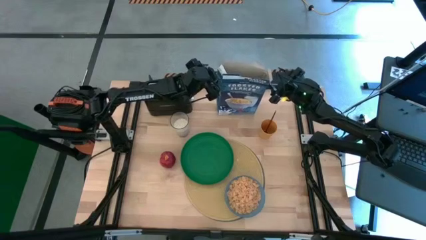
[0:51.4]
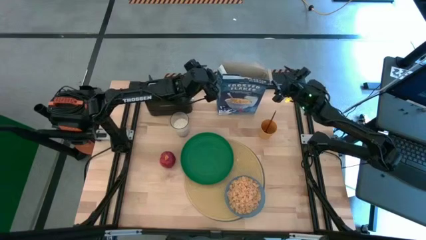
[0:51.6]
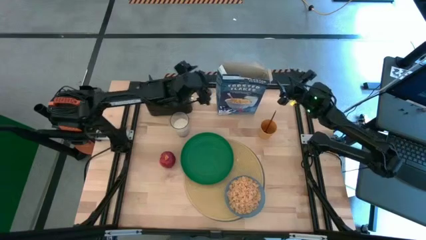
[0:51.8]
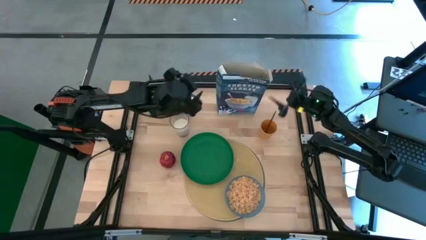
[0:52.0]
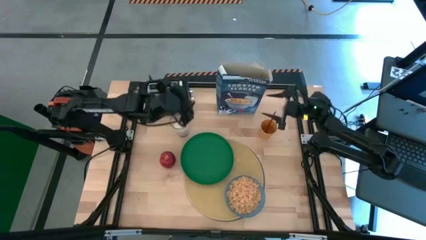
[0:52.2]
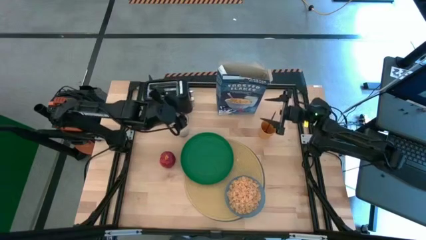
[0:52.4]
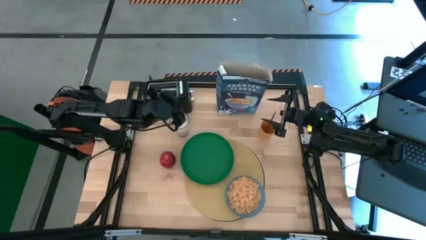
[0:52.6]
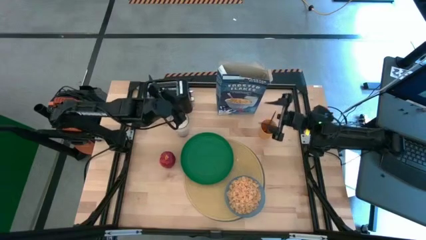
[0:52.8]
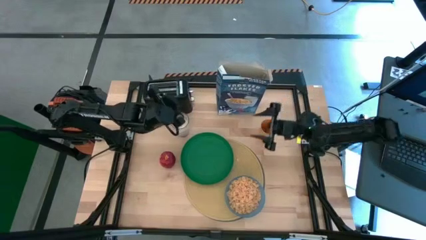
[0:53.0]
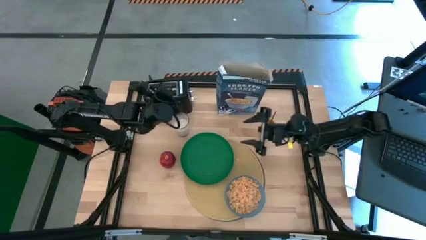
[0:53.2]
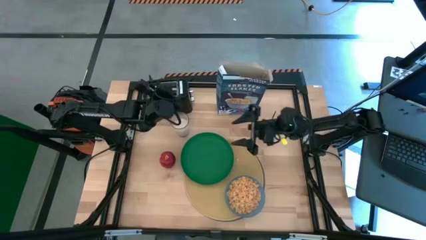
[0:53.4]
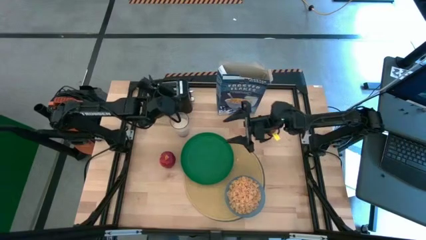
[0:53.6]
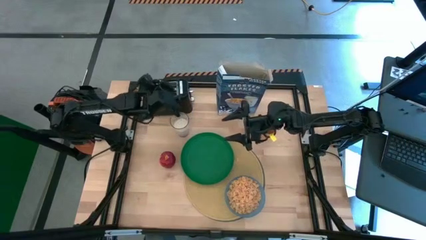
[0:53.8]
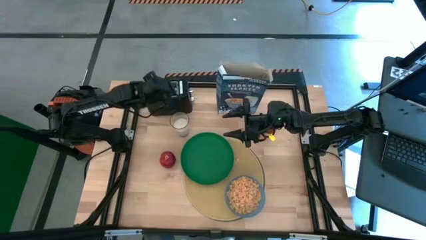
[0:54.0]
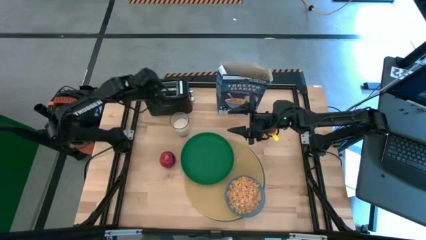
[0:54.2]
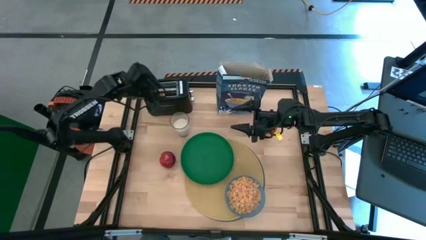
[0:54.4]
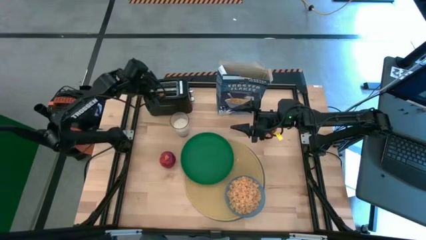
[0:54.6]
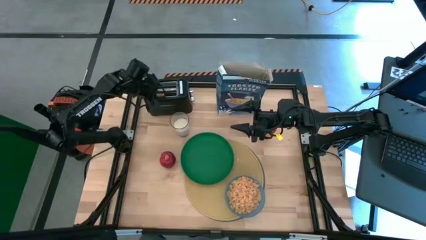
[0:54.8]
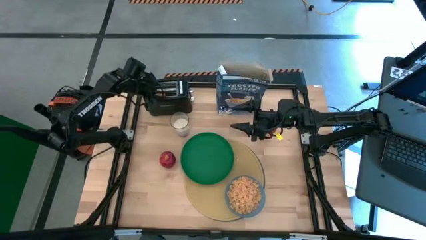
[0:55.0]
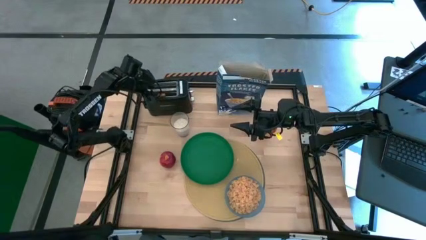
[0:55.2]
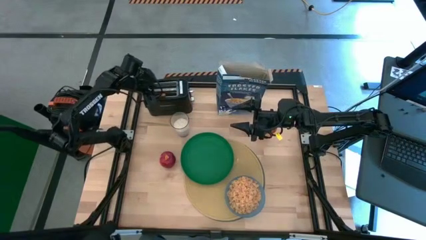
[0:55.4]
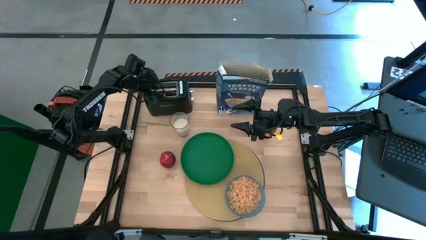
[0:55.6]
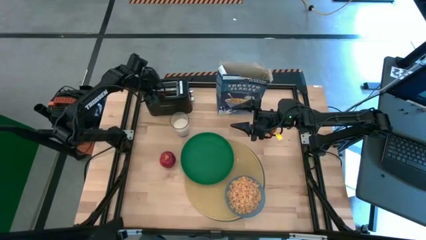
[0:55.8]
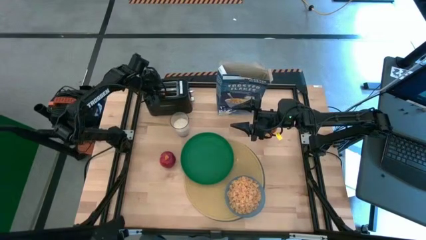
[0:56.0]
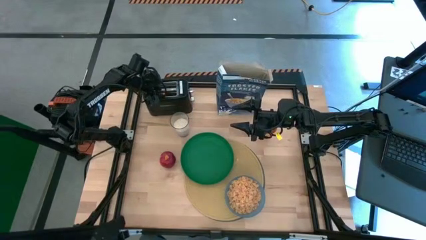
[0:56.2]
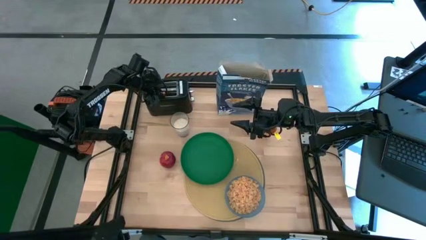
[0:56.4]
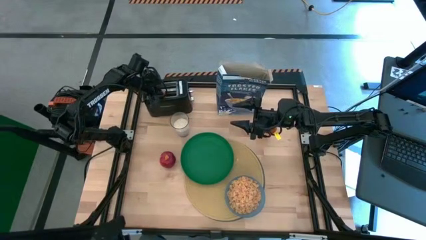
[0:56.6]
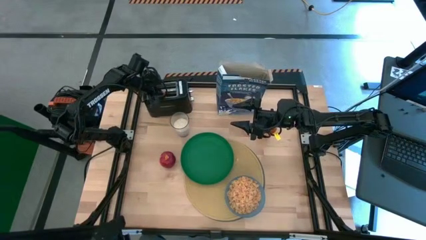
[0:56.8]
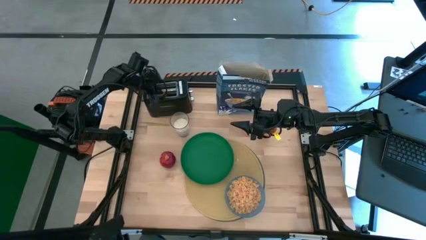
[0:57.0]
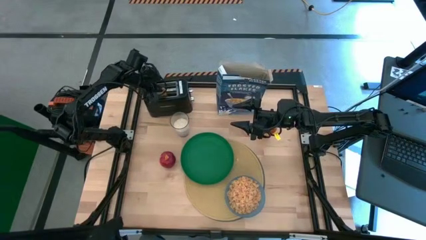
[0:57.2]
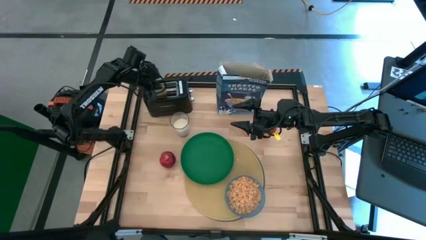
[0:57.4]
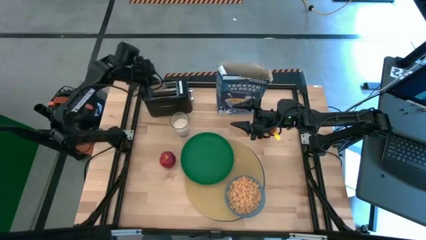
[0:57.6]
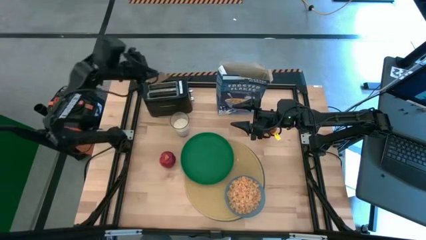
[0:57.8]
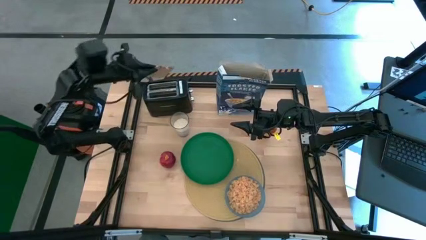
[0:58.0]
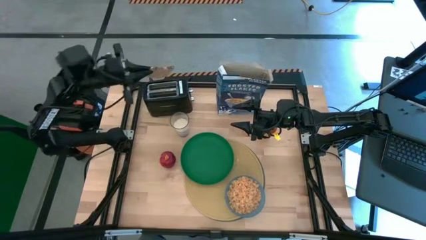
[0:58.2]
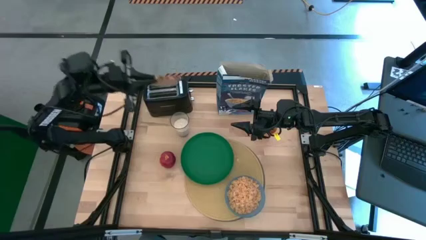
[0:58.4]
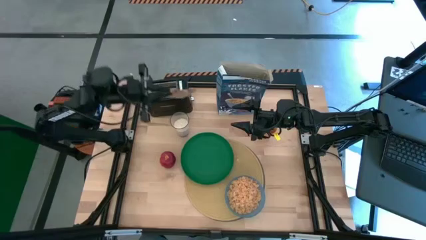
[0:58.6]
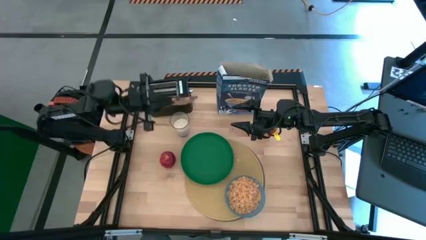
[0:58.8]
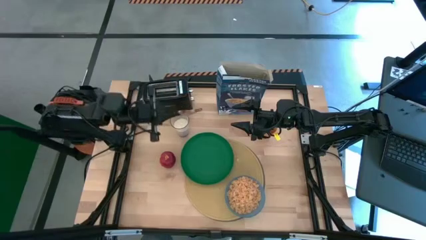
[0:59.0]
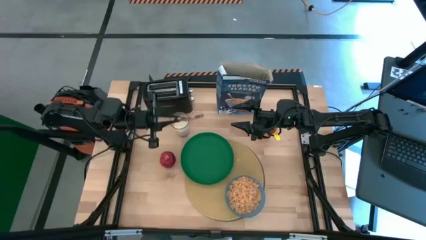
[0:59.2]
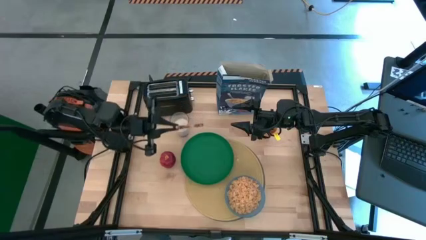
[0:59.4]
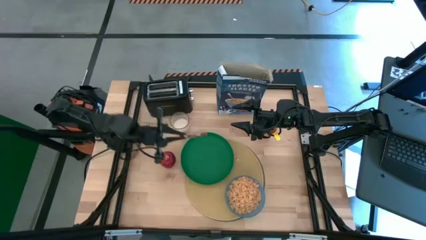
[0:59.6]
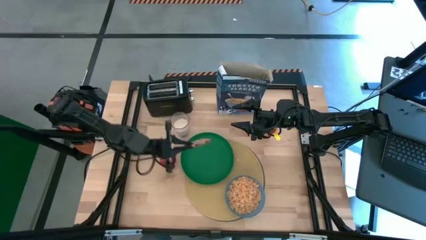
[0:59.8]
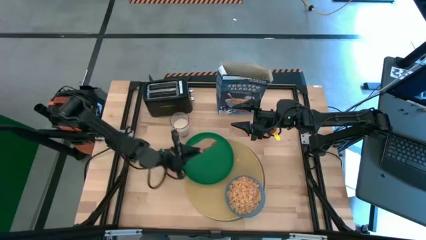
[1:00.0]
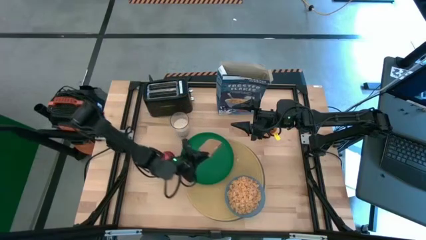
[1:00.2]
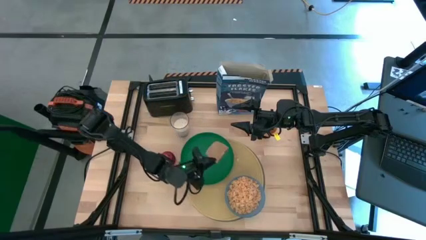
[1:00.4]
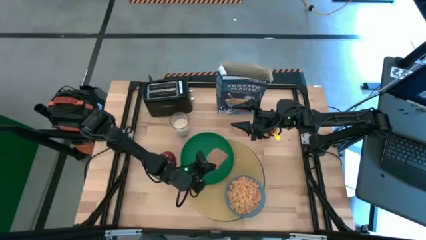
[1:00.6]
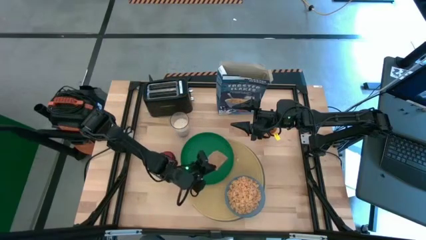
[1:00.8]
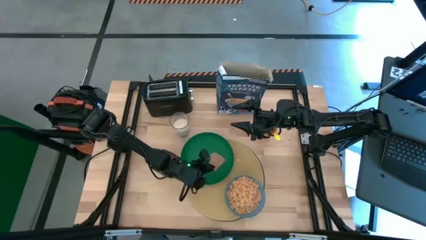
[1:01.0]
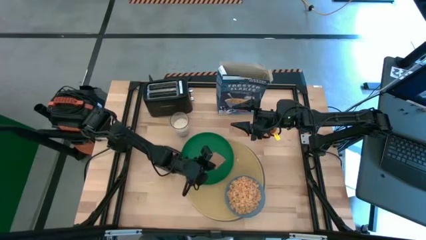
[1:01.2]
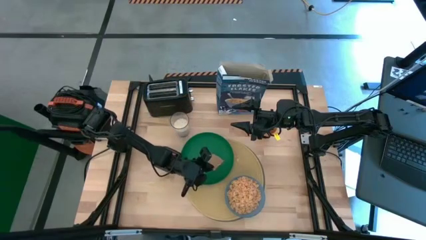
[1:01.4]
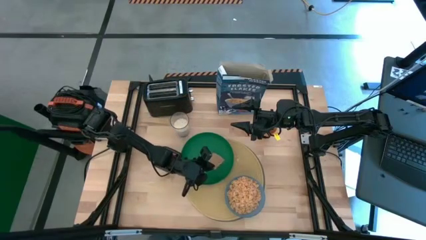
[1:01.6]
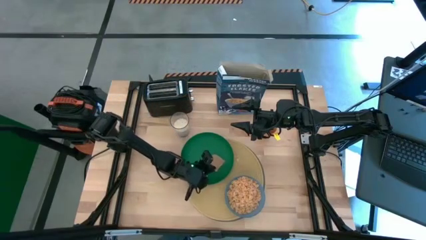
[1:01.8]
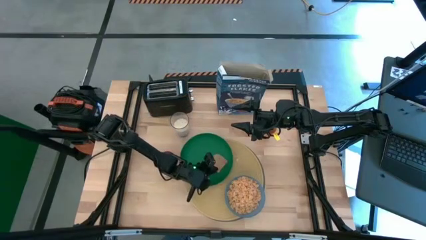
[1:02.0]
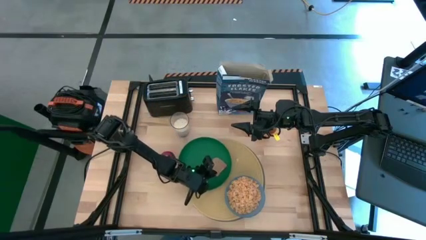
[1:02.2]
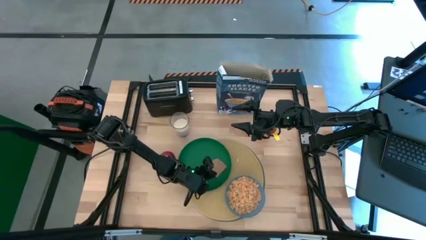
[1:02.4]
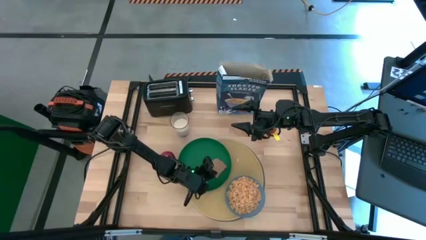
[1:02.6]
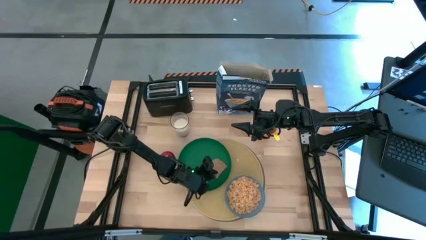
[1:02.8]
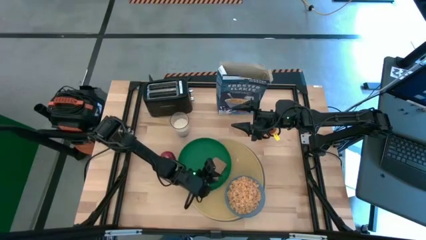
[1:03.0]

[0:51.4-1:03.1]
Task: Arrange a breakfast setting
Put the toasted bread from the toaster oven to the green plate
